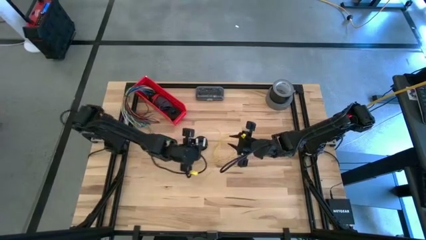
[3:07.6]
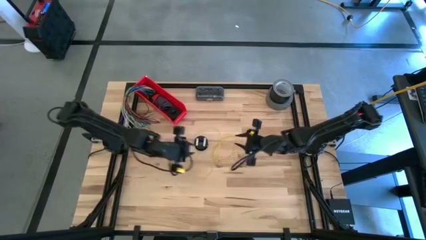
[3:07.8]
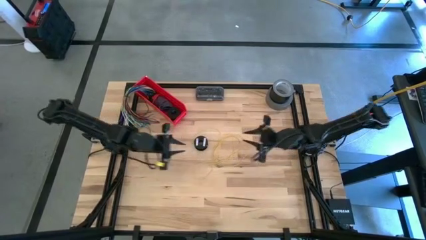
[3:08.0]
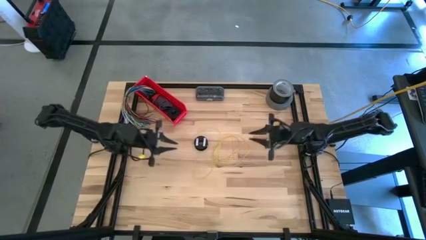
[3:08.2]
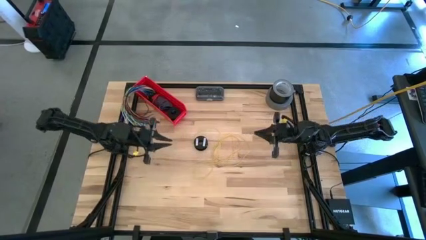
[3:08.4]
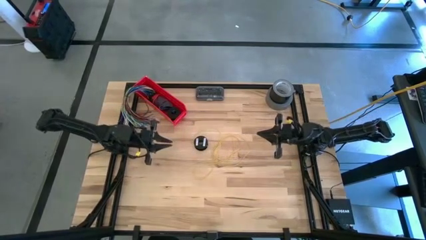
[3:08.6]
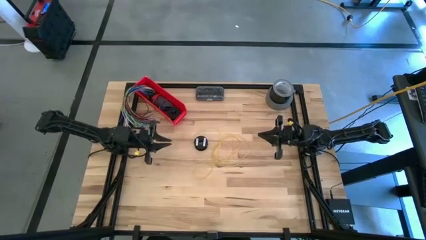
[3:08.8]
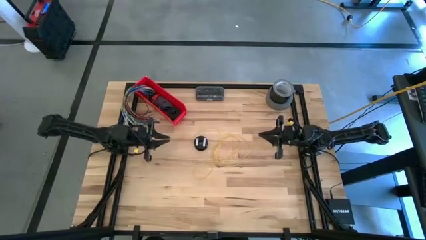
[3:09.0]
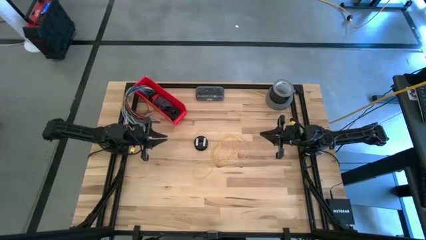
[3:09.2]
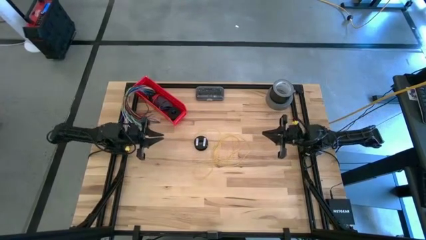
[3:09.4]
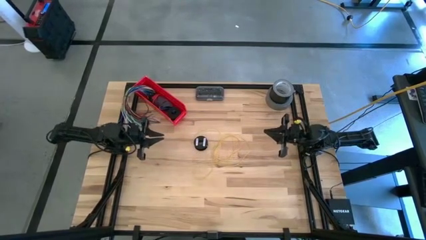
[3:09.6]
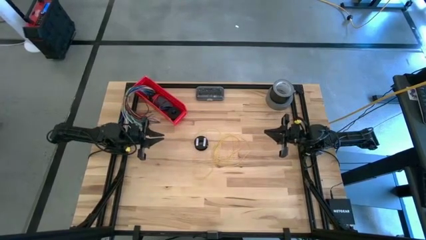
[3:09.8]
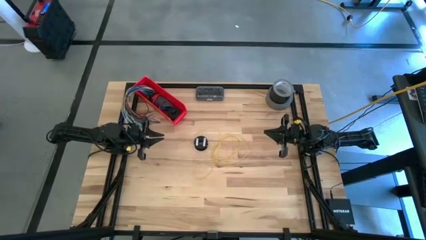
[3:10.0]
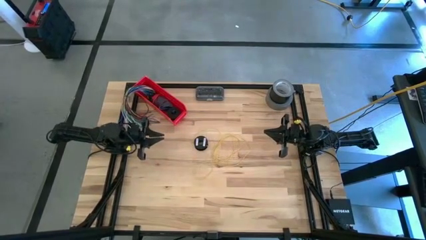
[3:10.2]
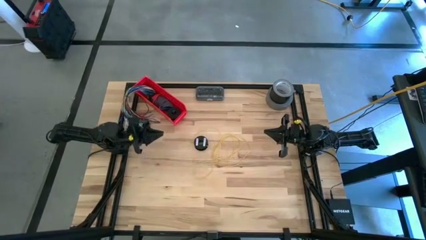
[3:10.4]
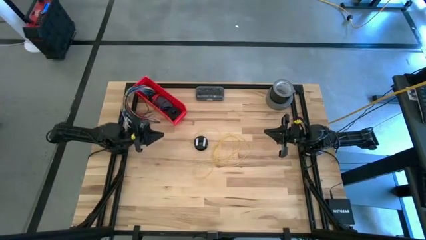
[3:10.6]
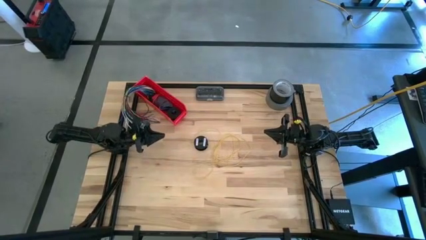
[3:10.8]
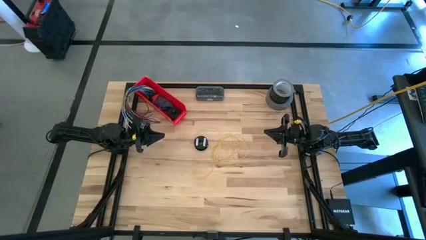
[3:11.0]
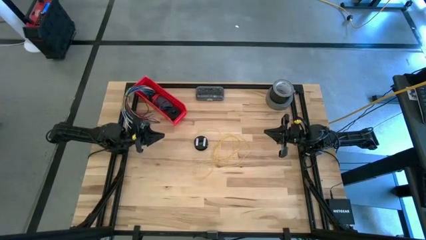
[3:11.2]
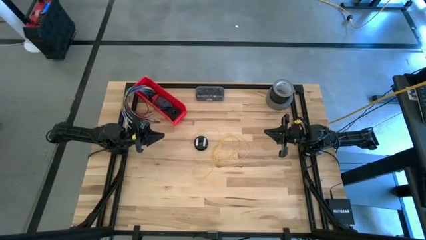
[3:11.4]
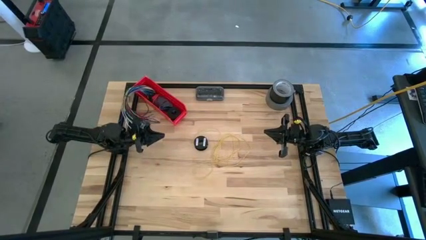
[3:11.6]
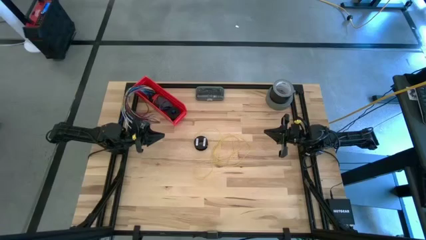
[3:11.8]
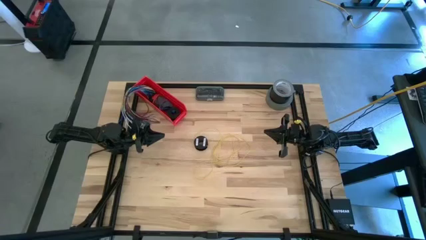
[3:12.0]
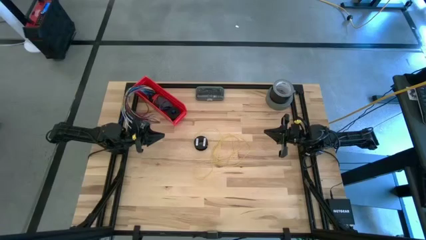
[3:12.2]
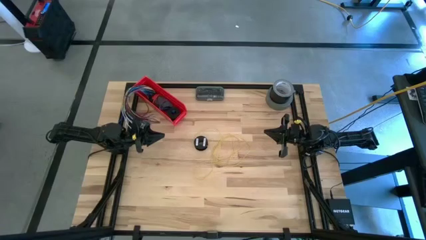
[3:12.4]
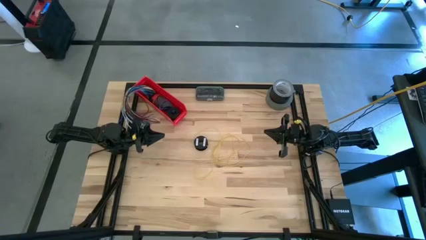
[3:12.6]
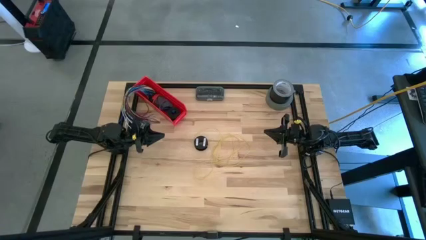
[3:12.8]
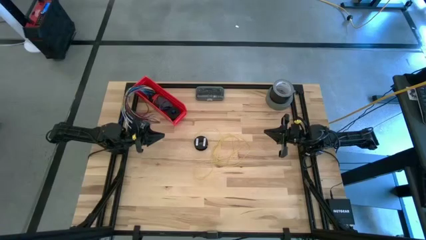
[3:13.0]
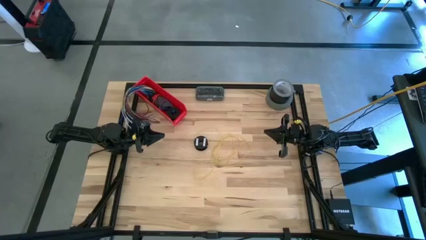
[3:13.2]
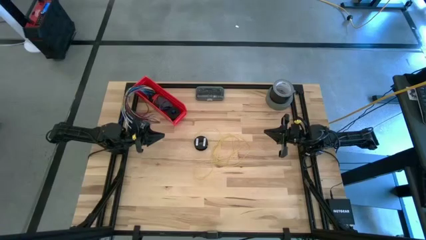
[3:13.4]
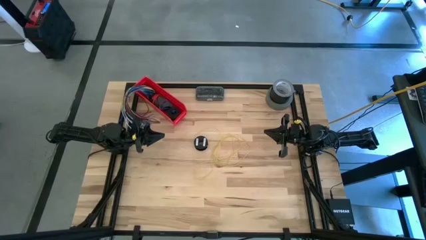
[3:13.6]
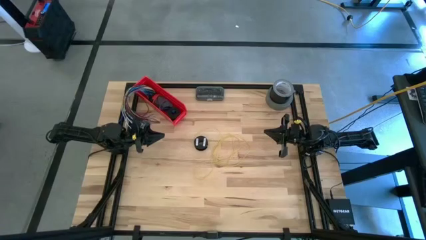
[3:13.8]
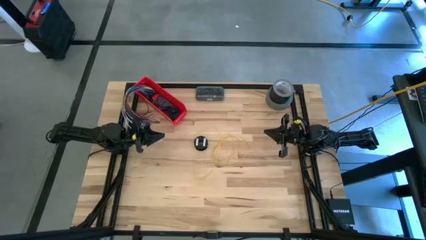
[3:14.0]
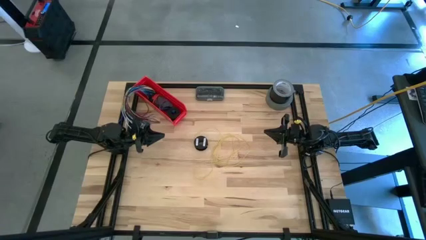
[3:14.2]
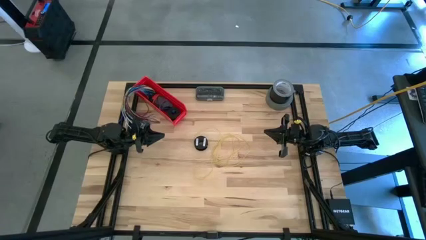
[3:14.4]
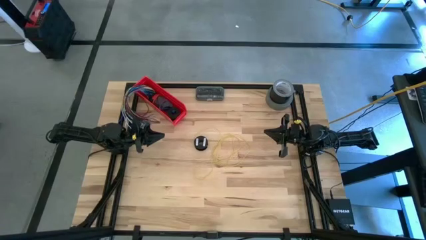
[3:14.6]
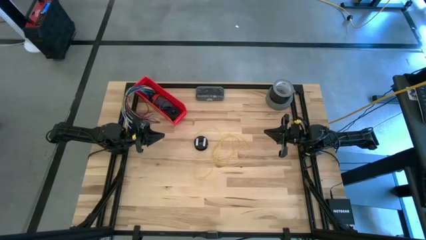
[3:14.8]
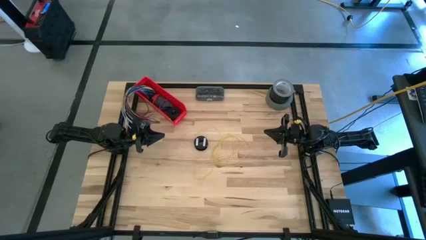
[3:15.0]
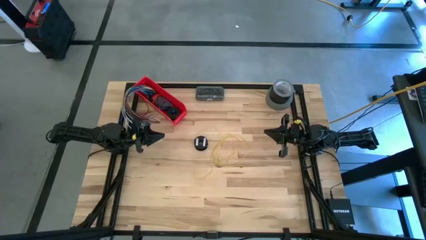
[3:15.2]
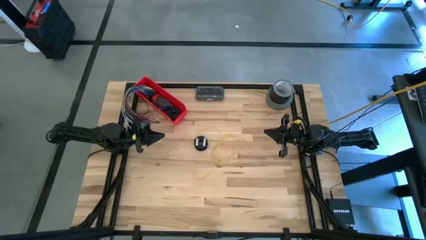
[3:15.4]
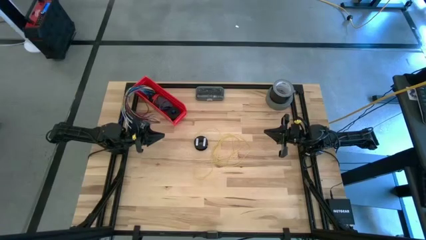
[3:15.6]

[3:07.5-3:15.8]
Task: Coil cords
Return to Home Position
